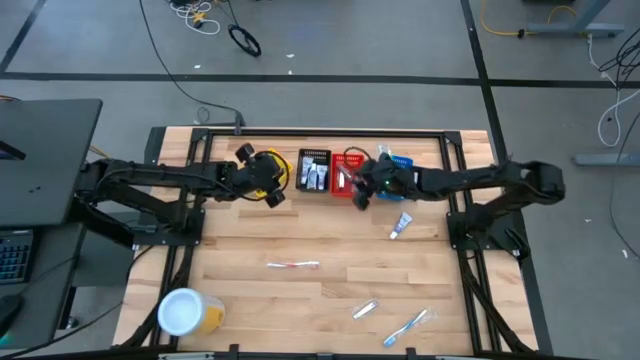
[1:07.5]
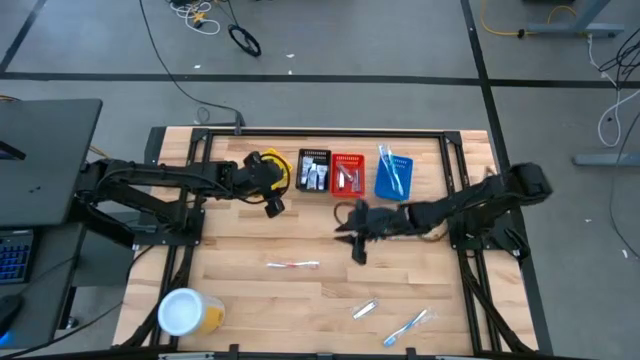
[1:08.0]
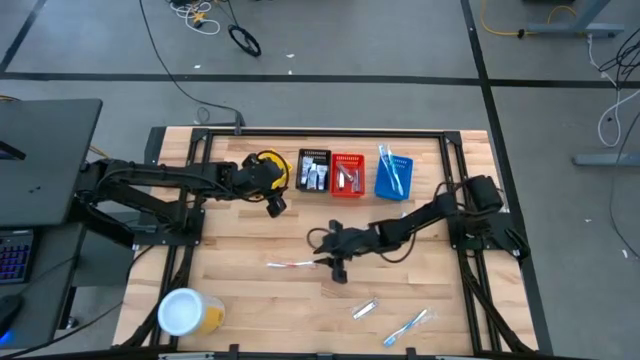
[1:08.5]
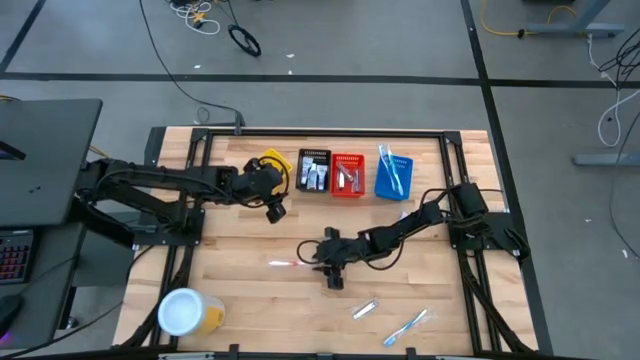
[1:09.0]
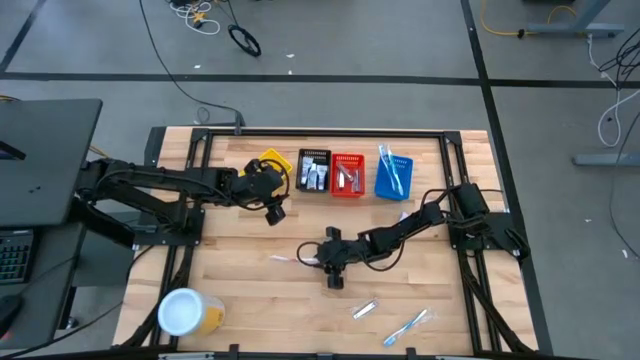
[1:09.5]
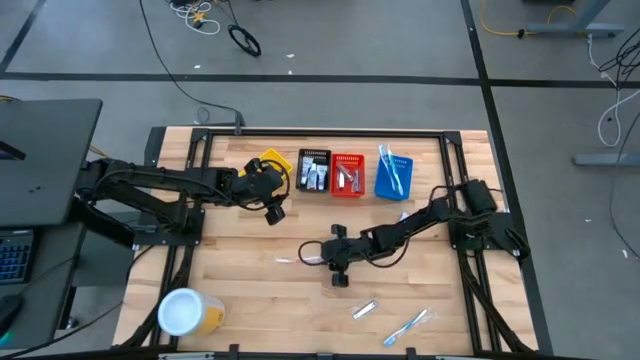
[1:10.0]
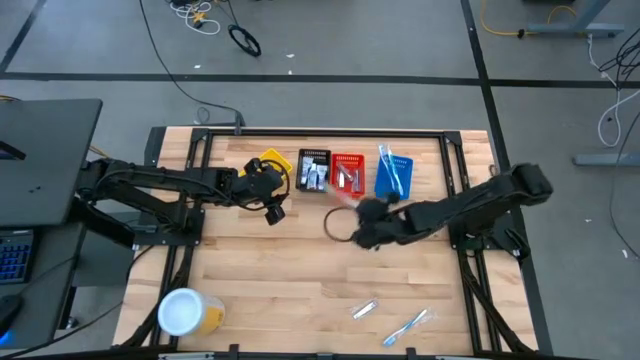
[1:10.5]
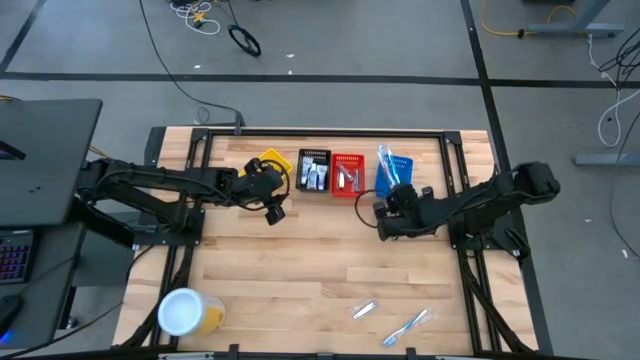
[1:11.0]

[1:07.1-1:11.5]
Task: Pick & Place Travel size toiletries
Put the orange toothbrush into the blue basket

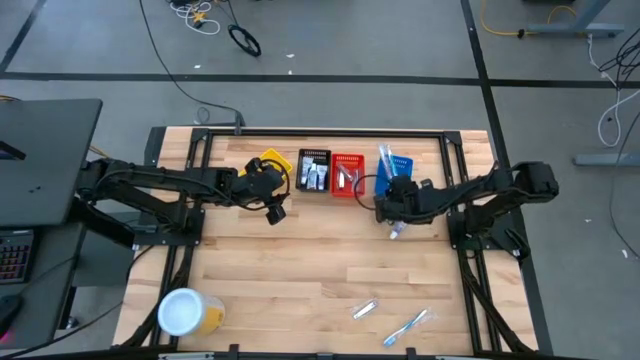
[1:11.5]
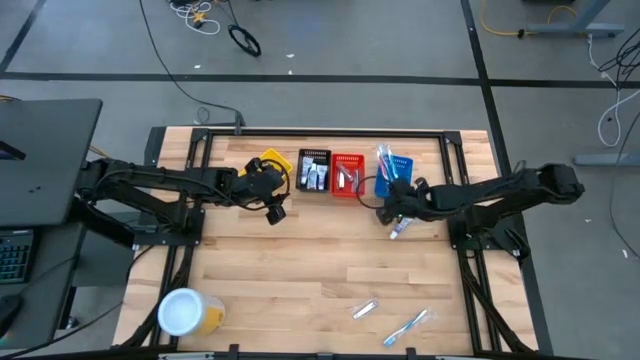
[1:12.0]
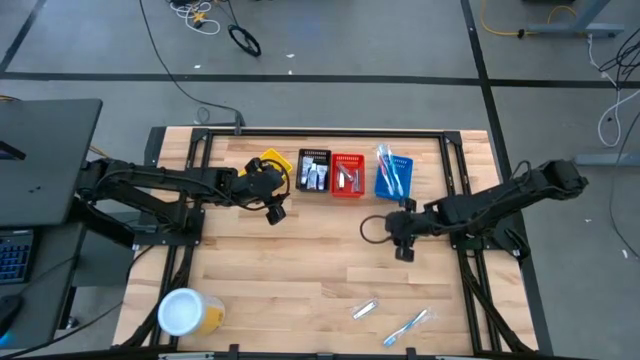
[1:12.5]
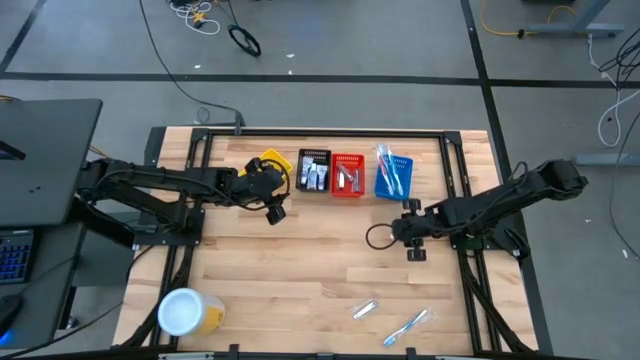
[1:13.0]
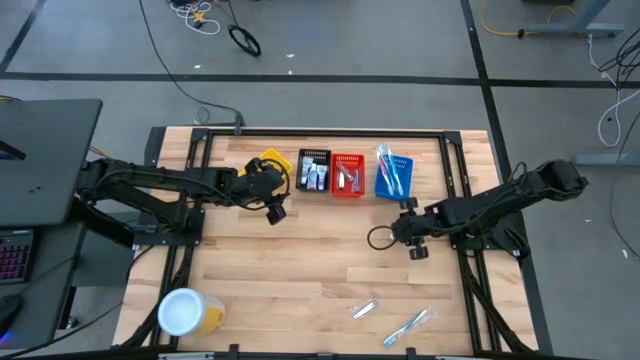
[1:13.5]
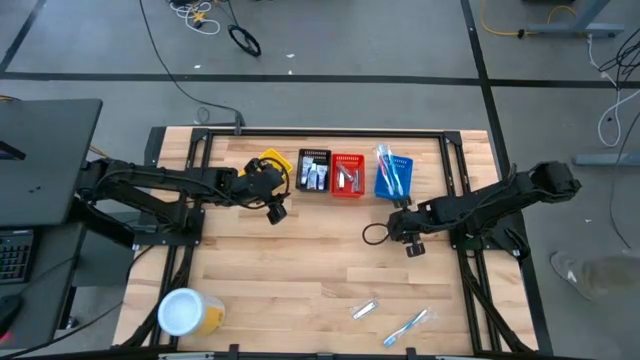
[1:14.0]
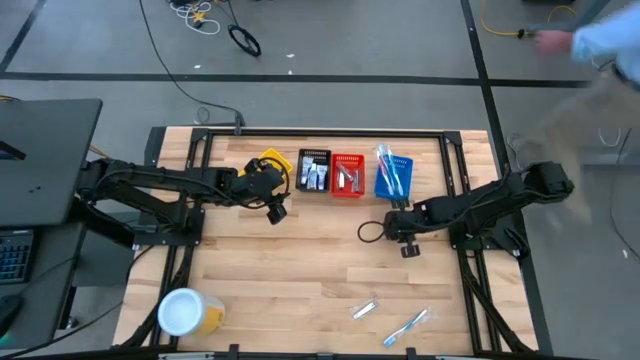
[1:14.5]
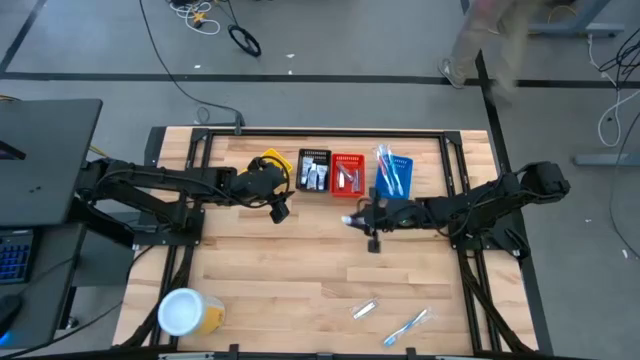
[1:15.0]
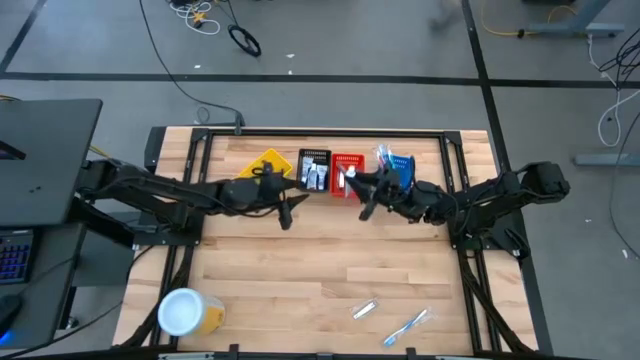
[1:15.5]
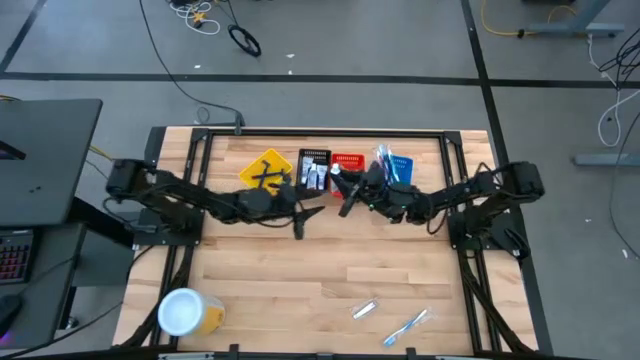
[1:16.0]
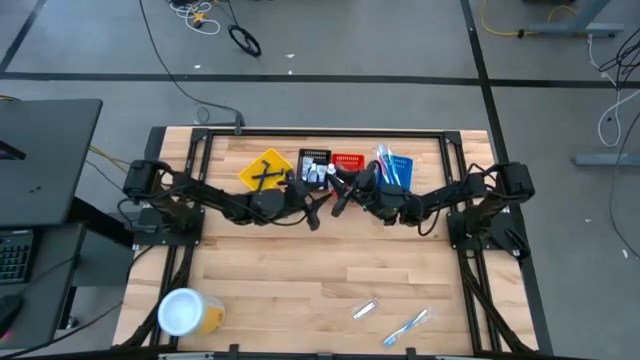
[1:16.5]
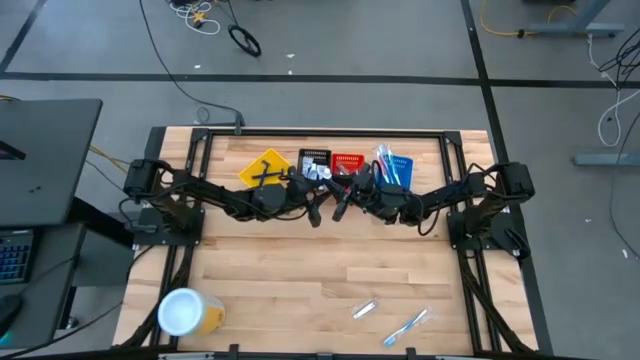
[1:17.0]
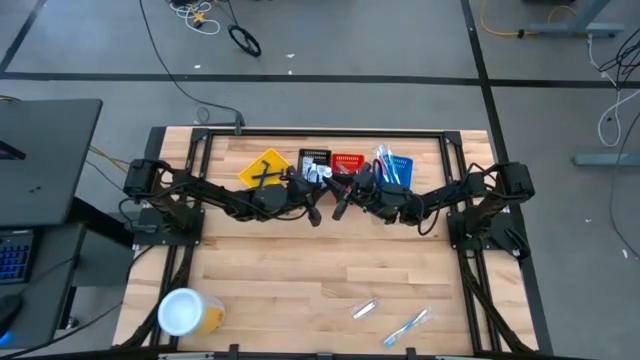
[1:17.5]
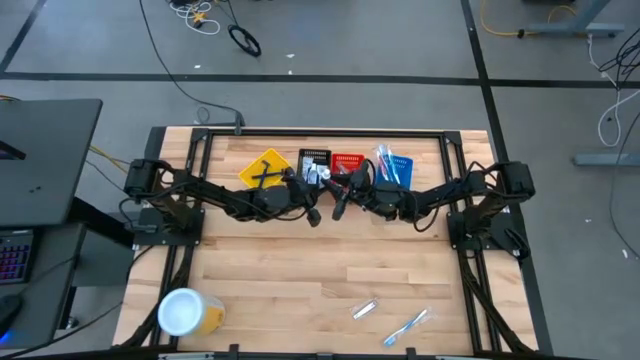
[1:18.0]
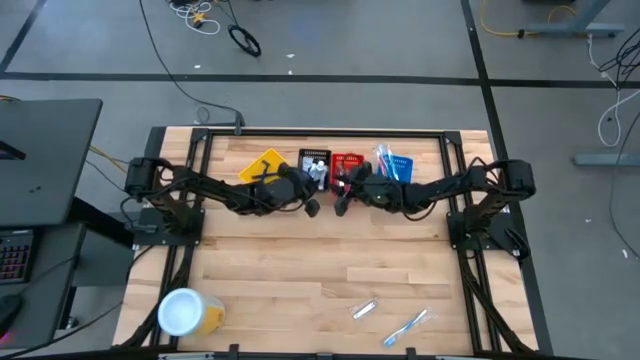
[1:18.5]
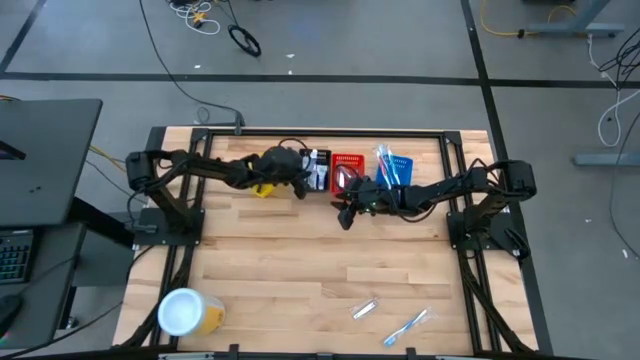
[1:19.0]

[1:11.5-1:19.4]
Put the white toothpaste into the black basket

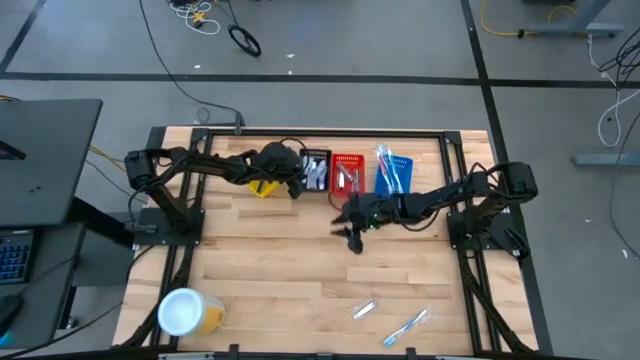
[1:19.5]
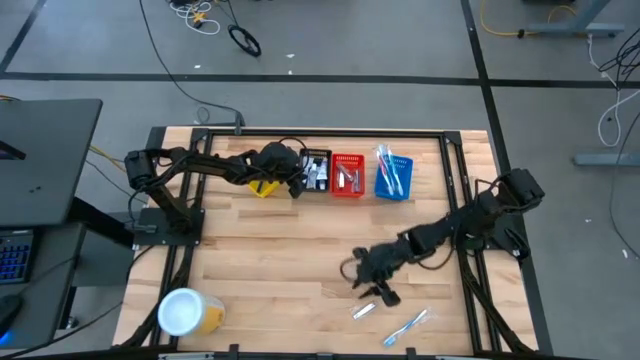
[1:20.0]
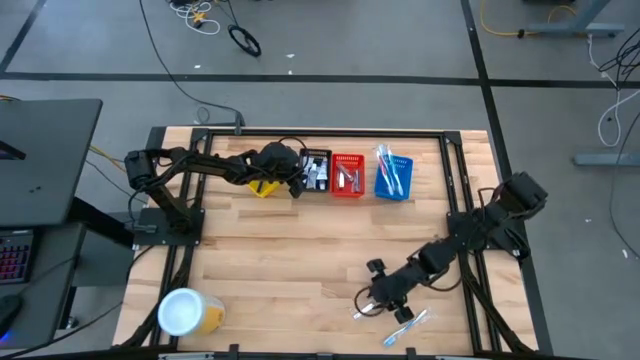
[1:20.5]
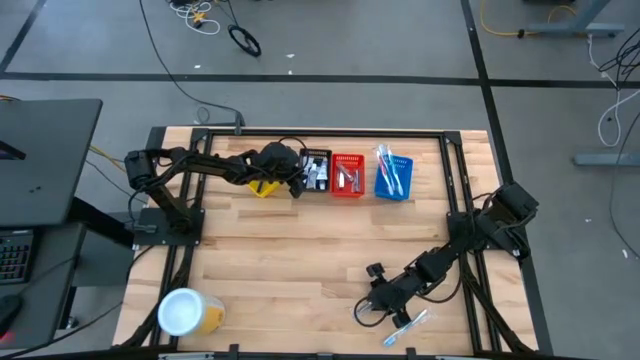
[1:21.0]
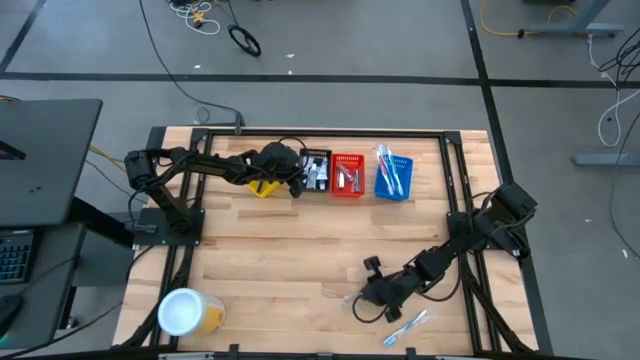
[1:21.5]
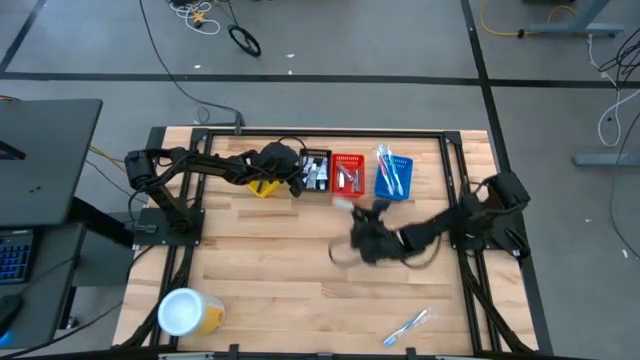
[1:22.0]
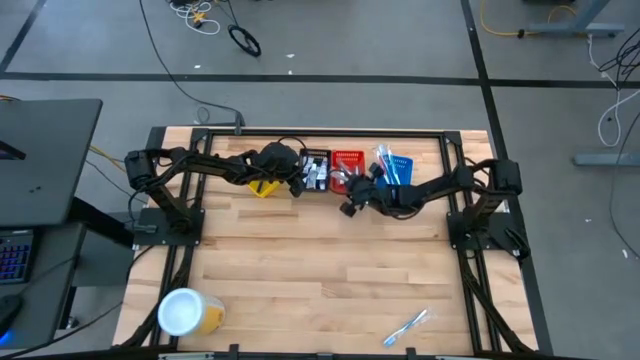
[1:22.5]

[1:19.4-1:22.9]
Put the silver nail cutter into the red basket

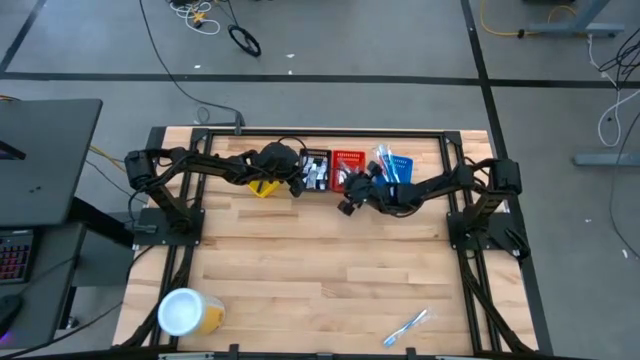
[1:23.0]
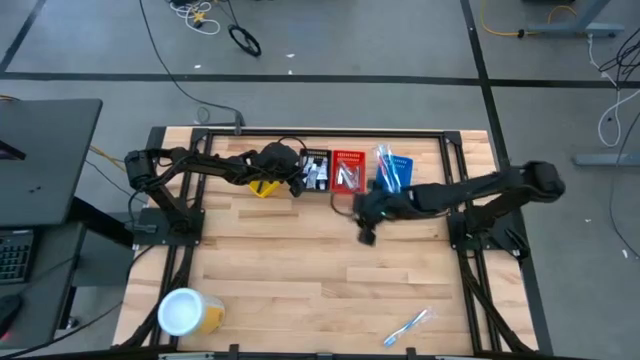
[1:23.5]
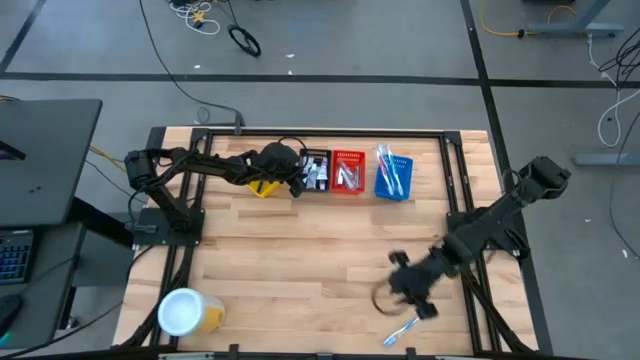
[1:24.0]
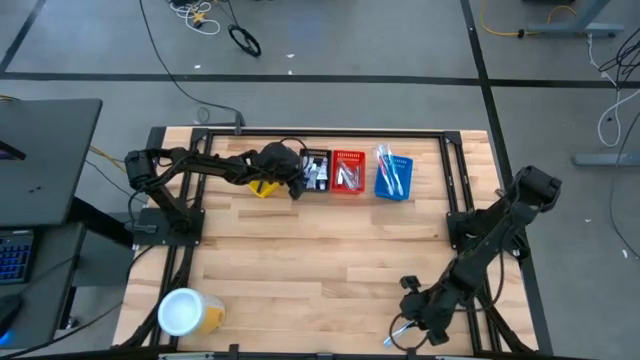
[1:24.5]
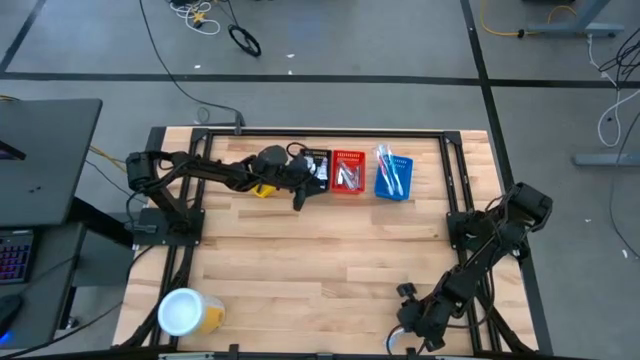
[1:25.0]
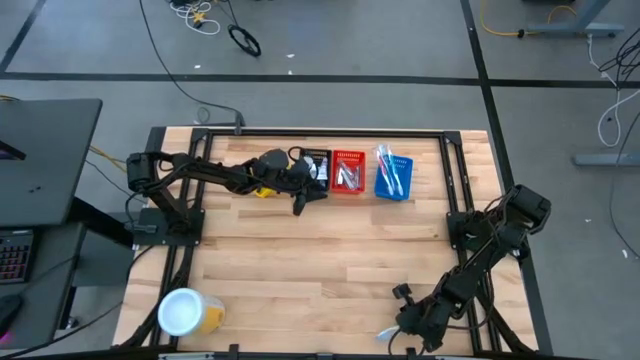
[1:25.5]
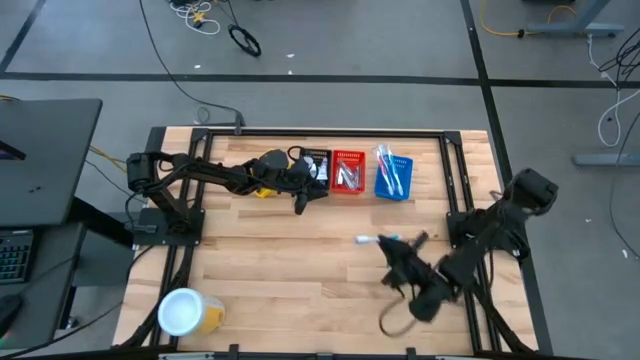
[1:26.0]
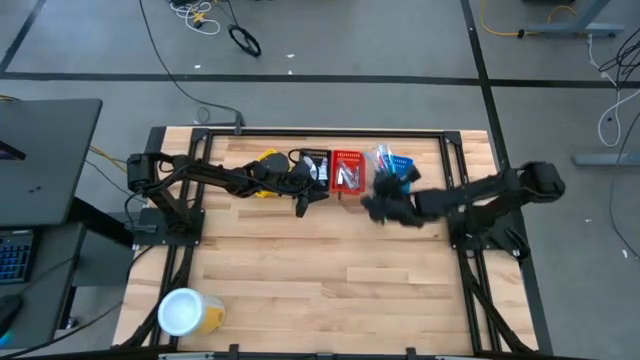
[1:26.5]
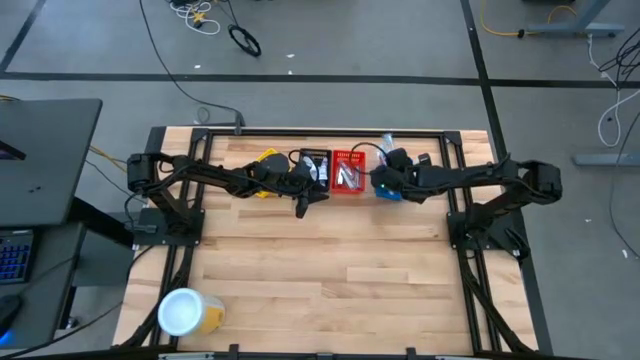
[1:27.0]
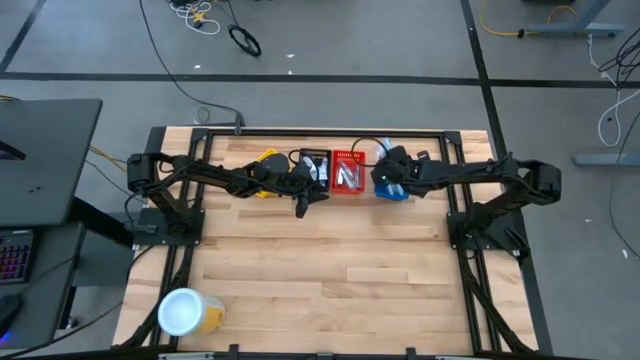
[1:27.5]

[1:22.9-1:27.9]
Put the blue toothbrush into the blue basket
